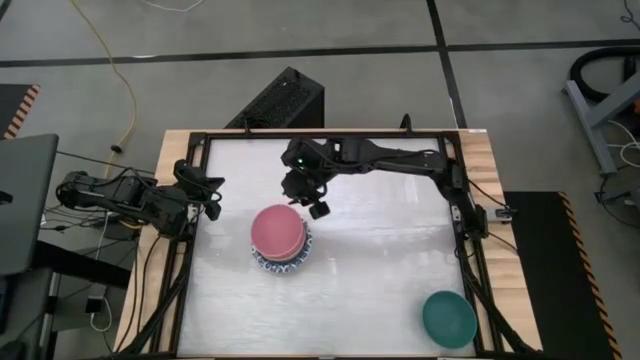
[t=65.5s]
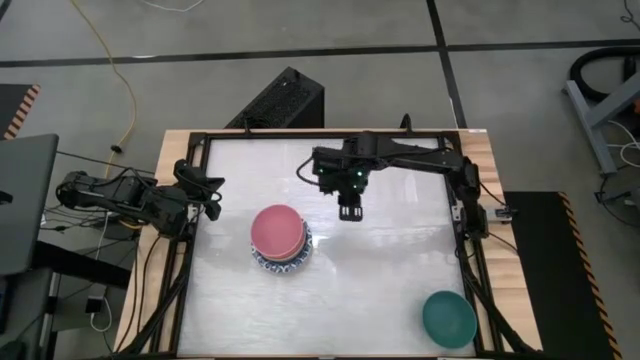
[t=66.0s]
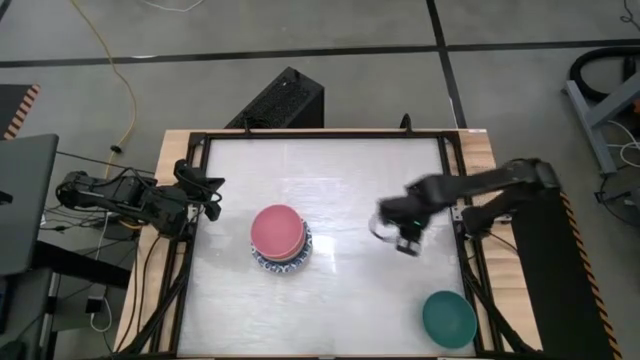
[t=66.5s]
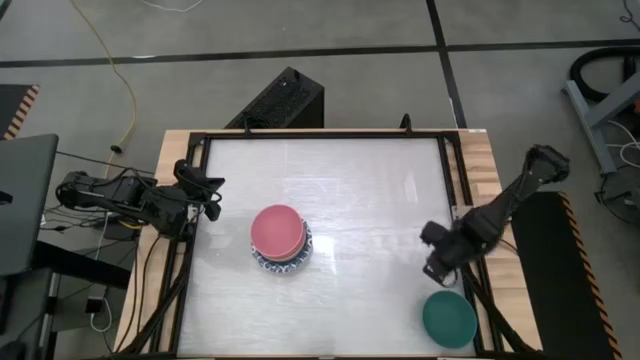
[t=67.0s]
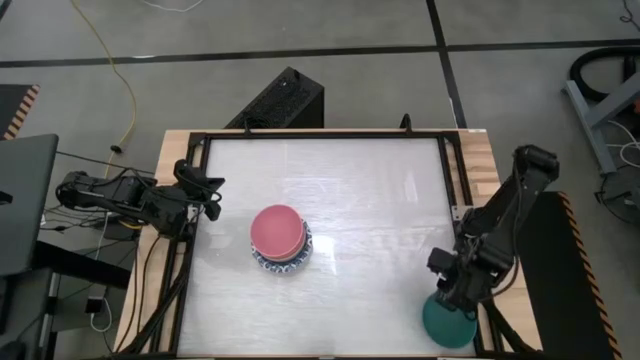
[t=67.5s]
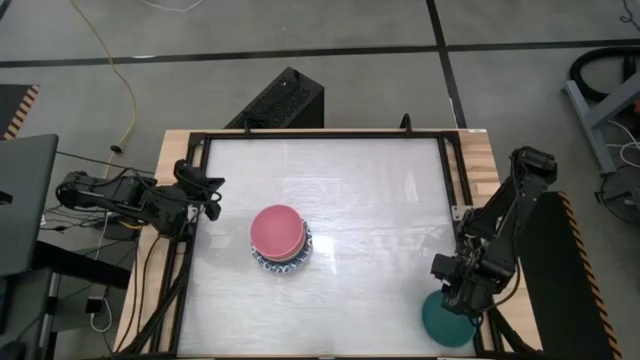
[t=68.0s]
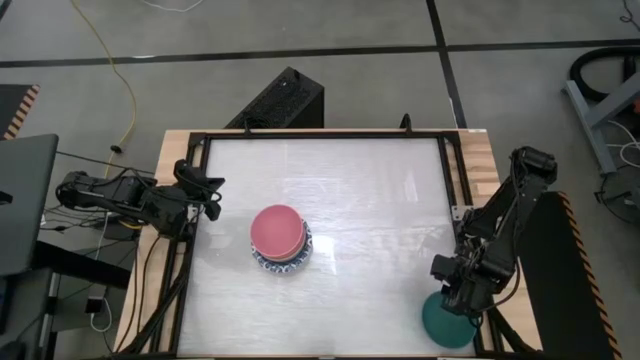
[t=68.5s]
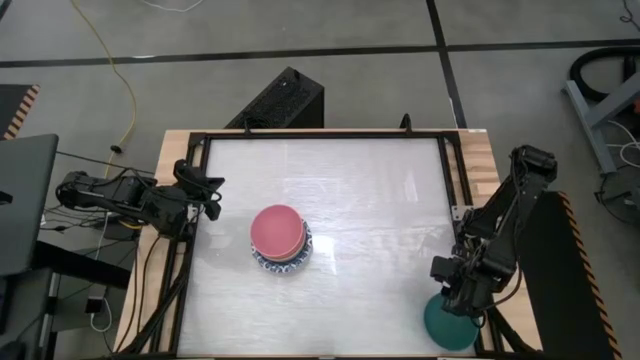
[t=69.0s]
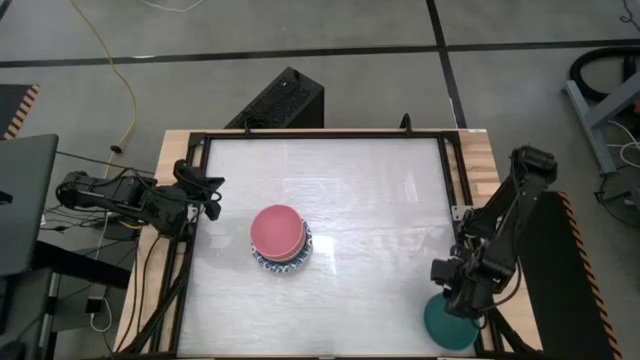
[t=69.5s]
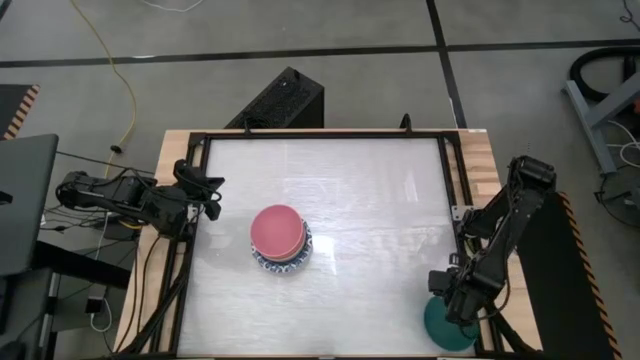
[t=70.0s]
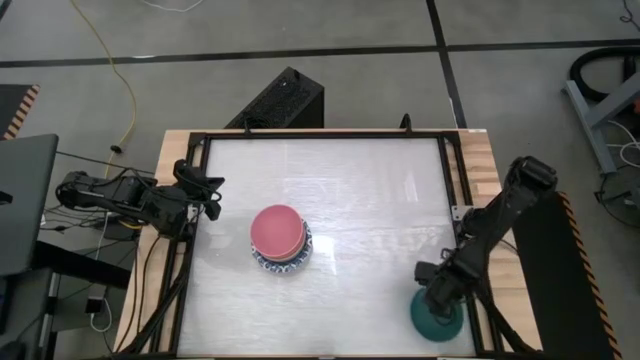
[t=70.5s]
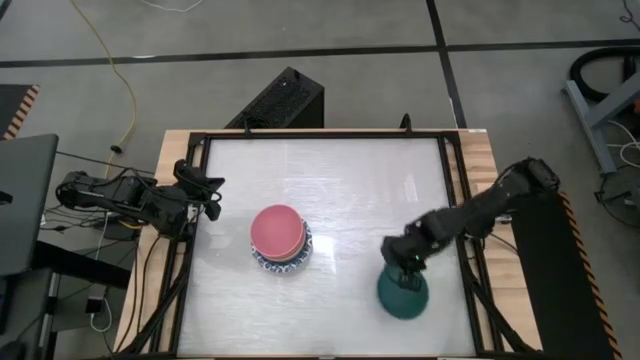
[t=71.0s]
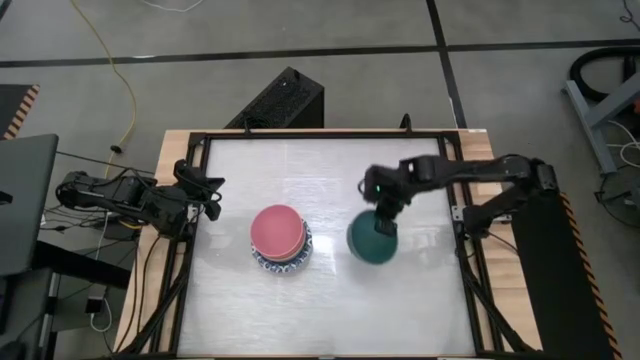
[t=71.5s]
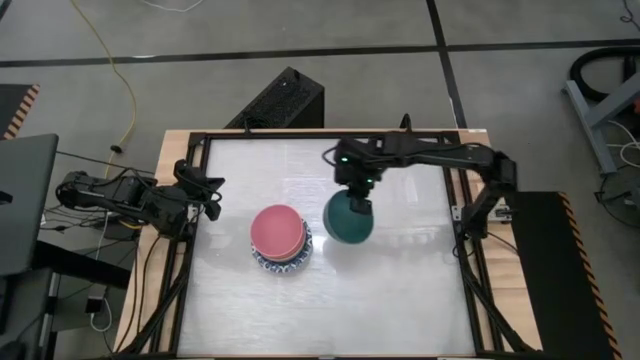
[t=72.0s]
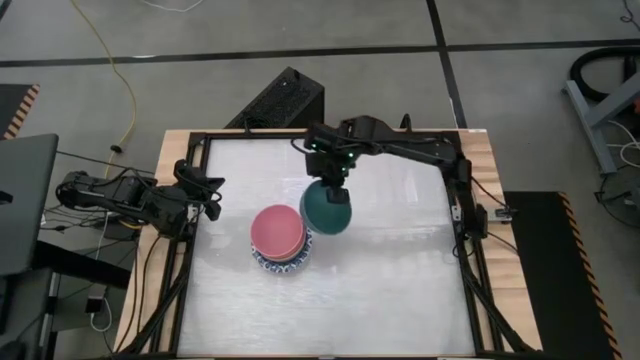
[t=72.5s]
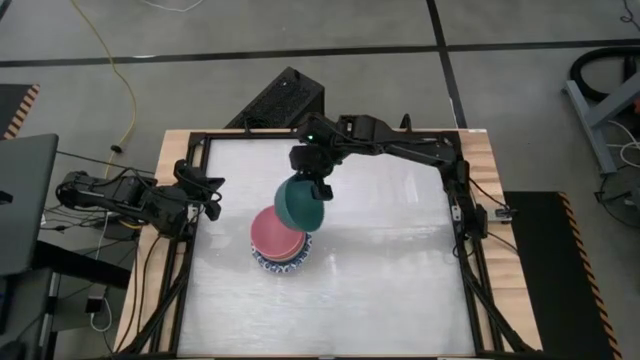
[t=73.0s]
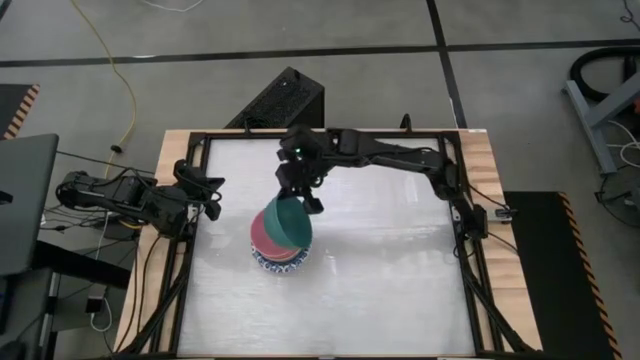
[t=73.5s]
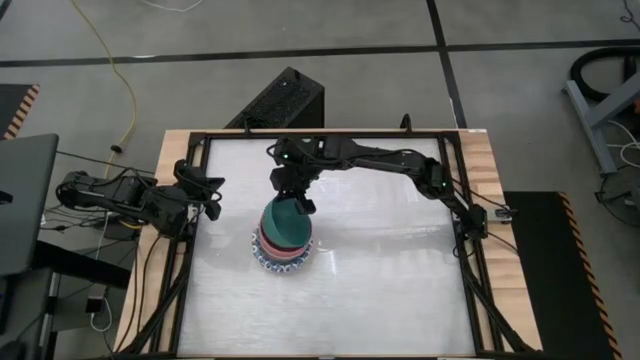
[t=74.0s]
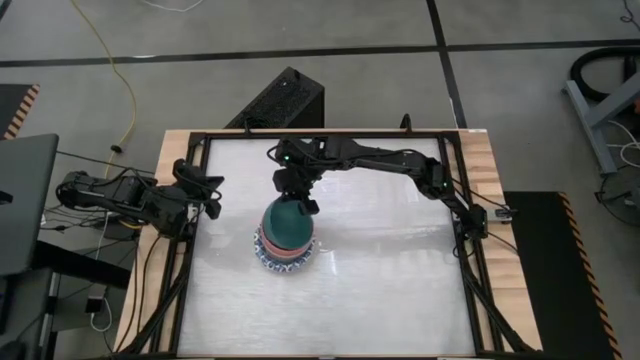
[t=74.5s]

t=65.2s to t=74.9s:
Stack the green bowl on top of the pink bowl

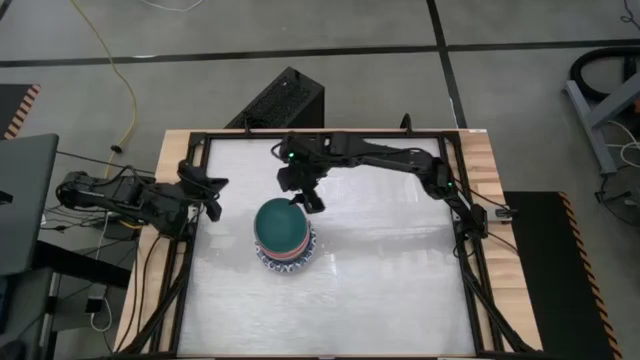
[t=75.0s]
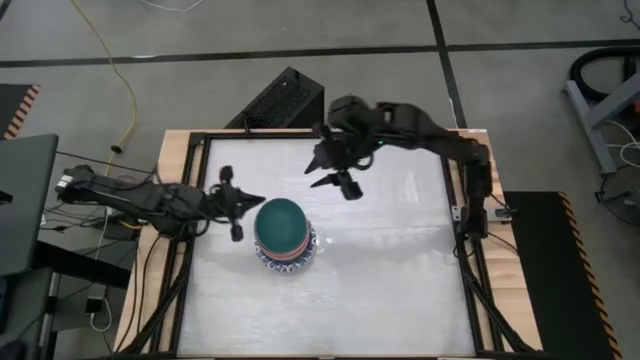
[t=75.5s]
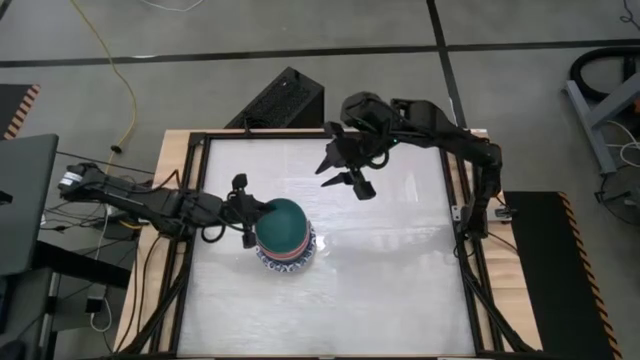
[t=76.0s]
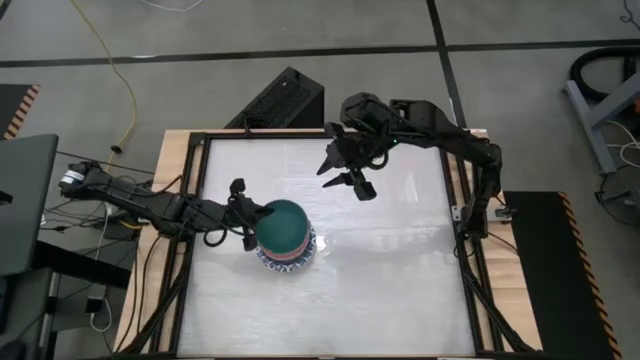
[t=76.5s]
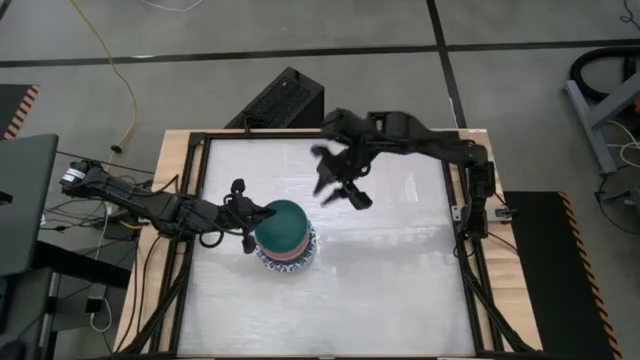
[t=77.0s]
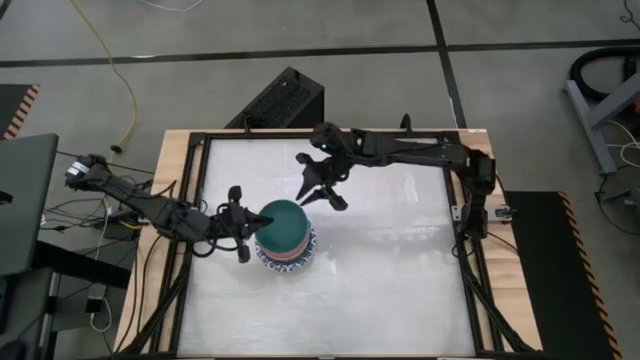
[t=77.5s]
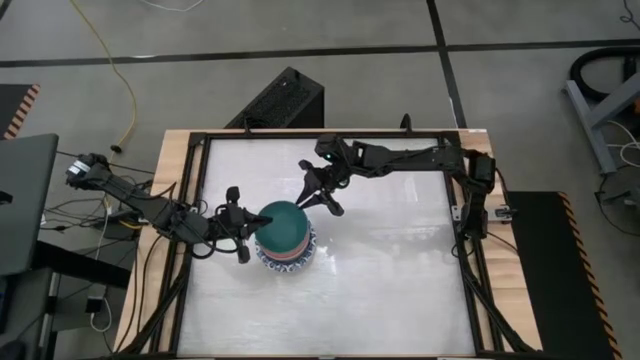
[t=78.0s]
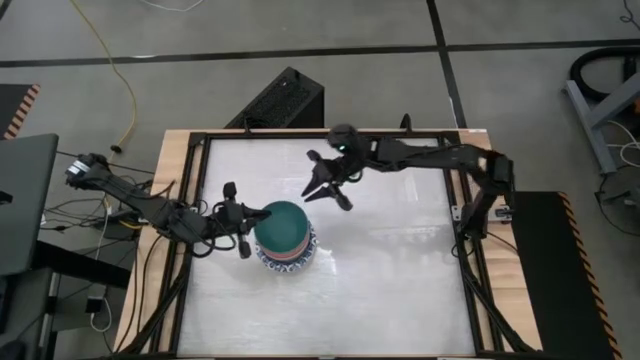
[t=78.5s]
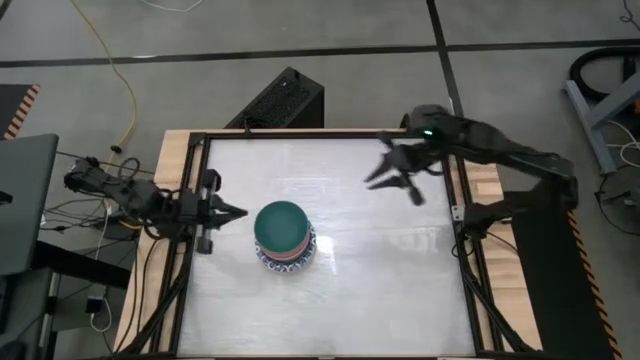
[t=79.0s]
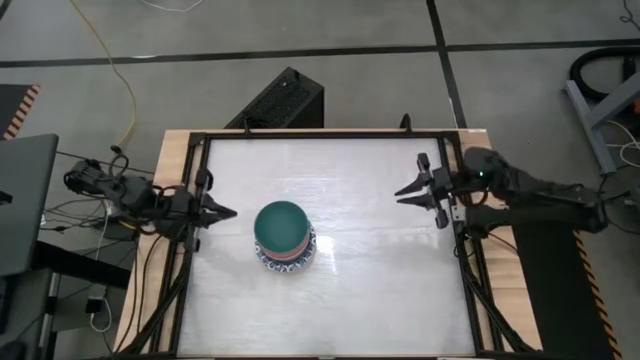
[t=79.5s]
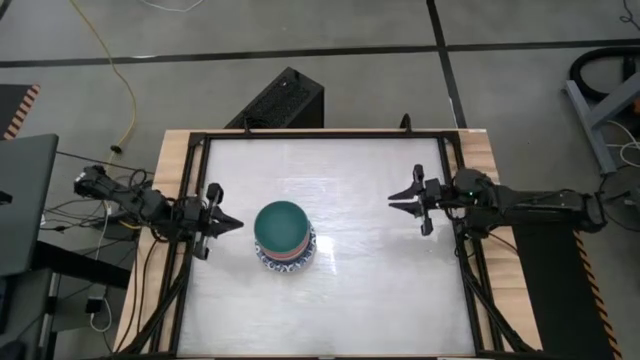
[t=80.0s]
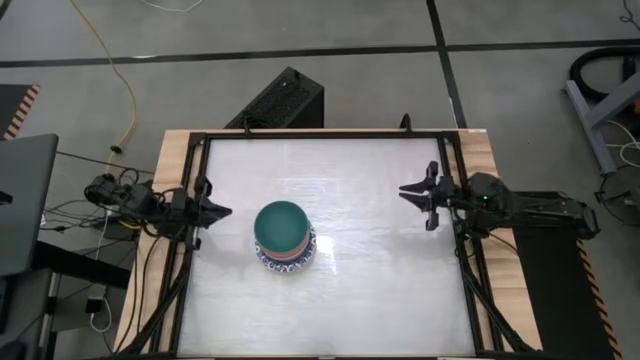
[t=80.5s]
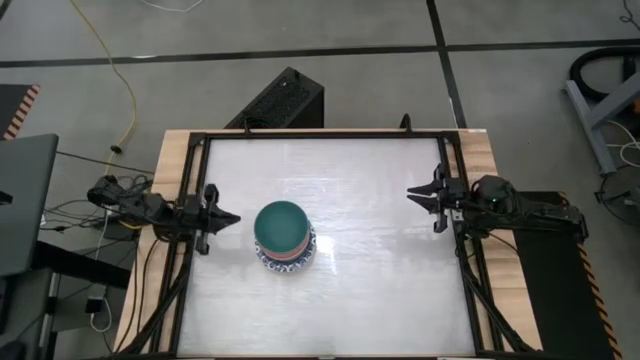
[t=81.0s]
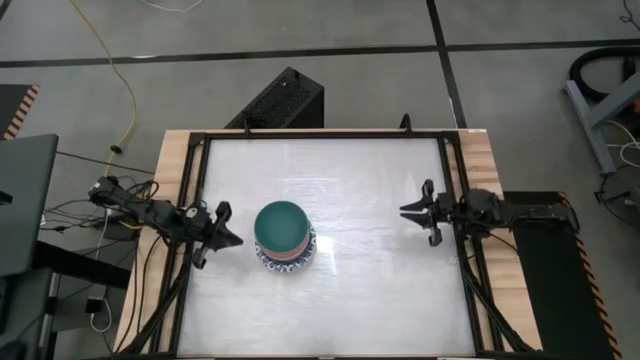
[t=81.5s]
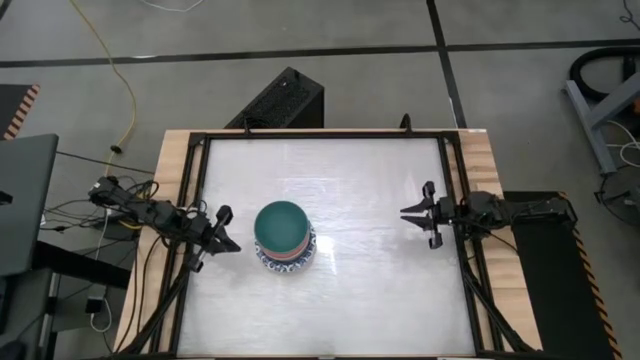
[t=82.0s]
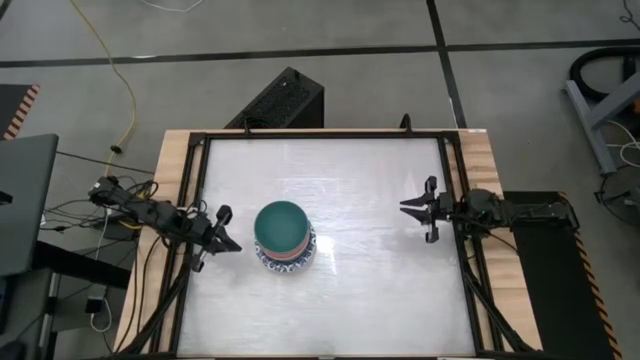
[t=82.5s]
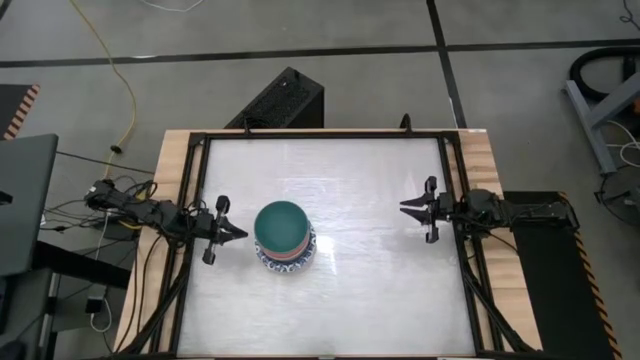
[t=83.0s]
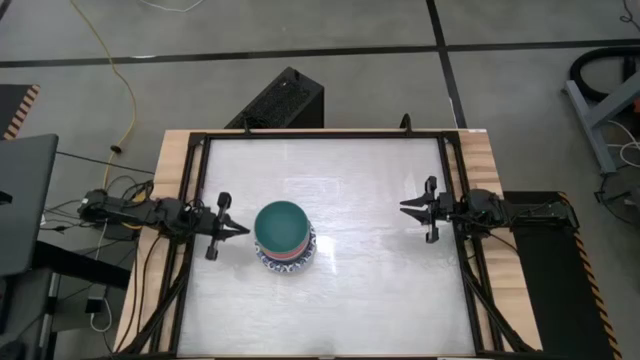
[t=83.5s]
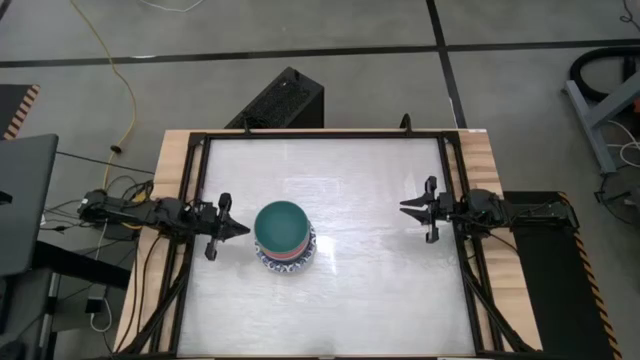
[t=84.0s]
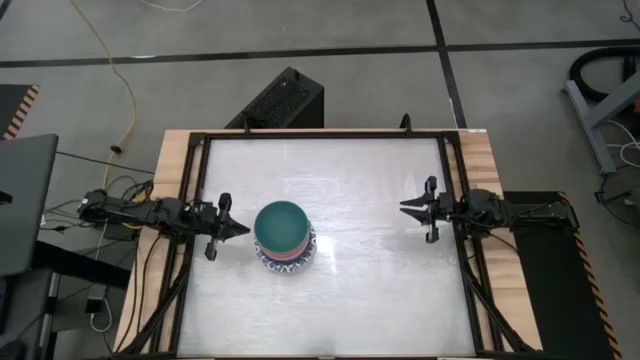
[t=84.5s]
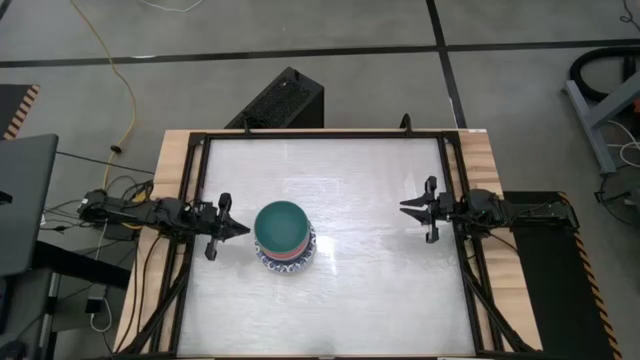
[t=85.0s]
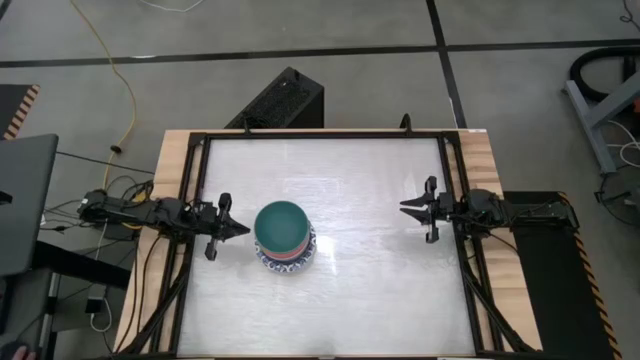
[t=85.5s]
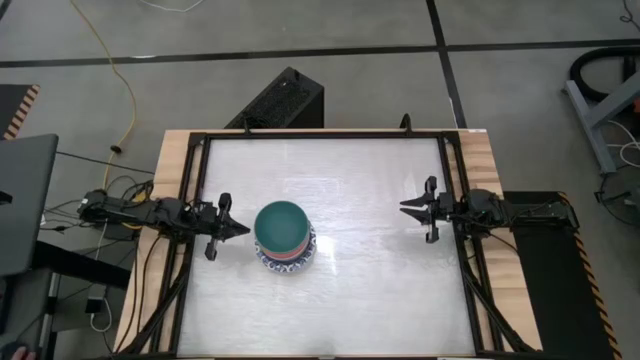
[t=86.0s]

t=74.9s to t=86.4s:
Return to Home Position
